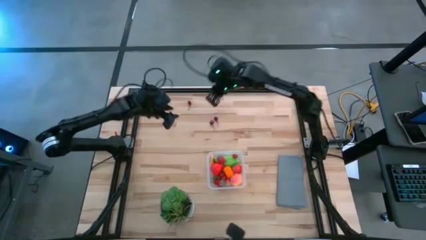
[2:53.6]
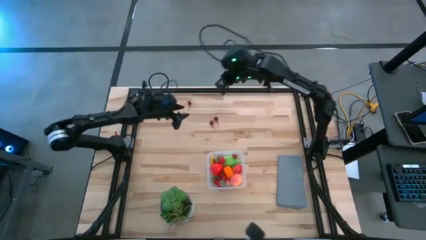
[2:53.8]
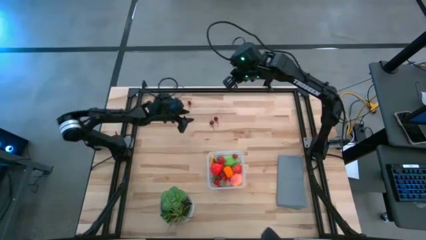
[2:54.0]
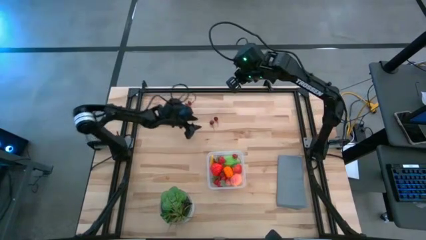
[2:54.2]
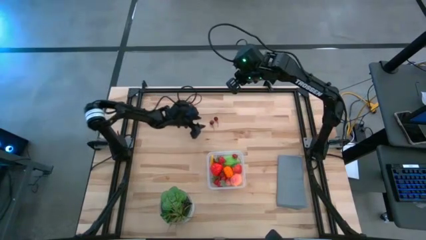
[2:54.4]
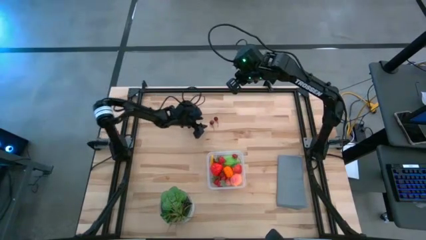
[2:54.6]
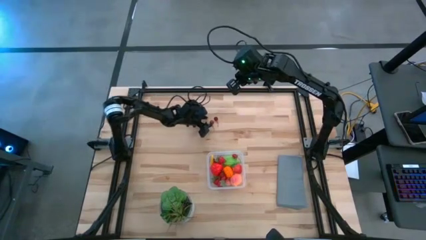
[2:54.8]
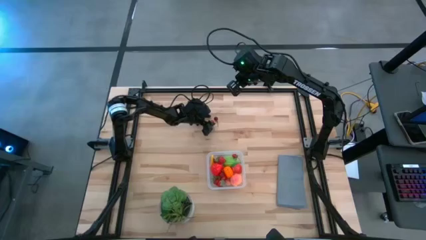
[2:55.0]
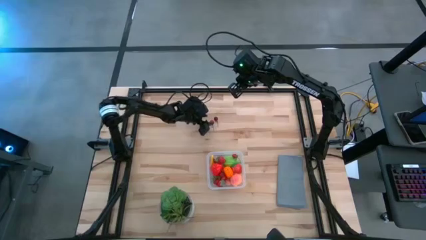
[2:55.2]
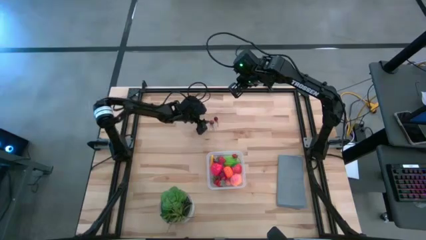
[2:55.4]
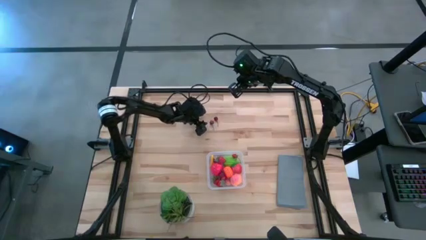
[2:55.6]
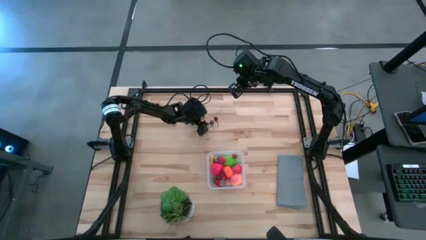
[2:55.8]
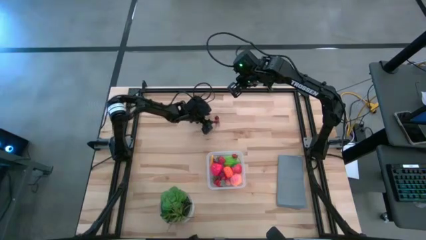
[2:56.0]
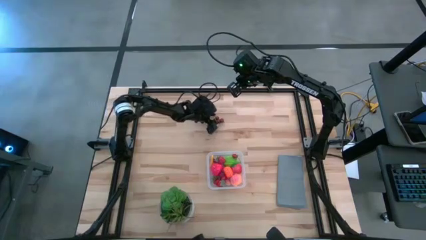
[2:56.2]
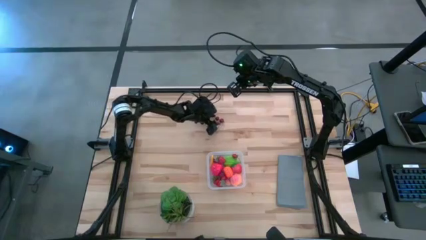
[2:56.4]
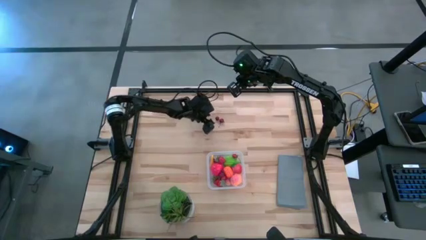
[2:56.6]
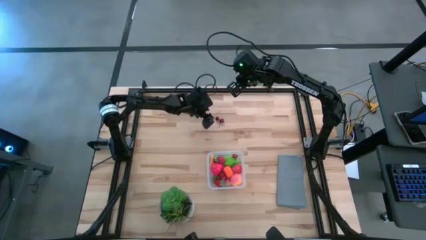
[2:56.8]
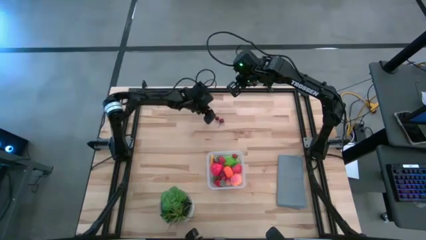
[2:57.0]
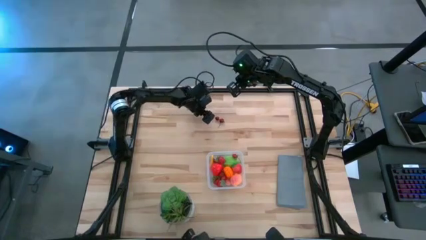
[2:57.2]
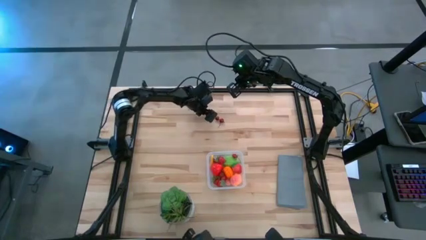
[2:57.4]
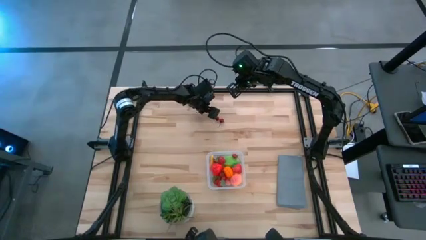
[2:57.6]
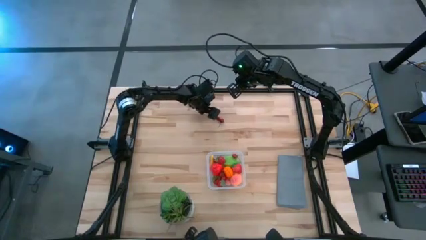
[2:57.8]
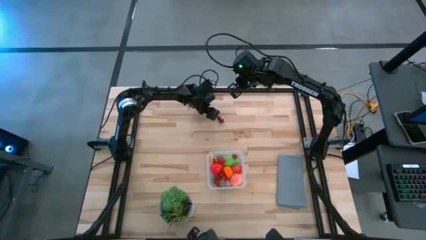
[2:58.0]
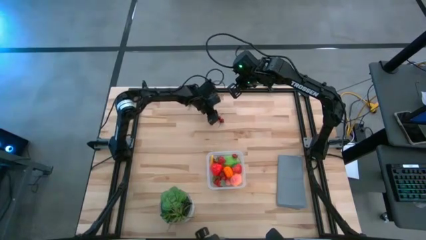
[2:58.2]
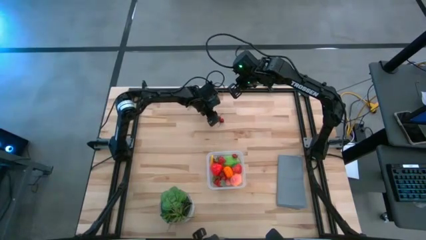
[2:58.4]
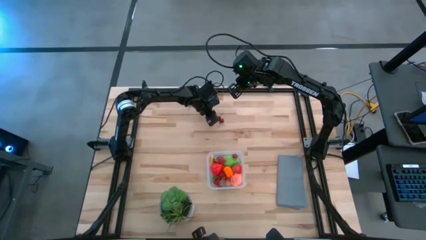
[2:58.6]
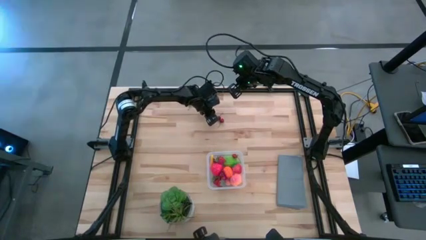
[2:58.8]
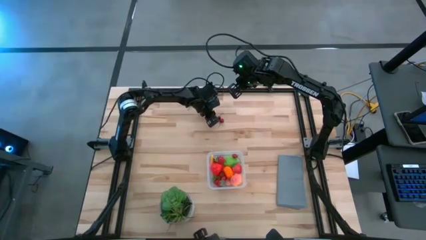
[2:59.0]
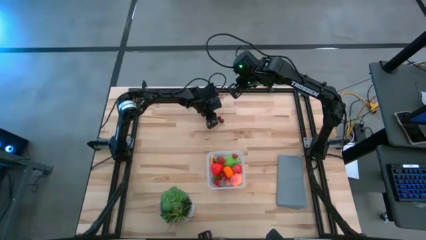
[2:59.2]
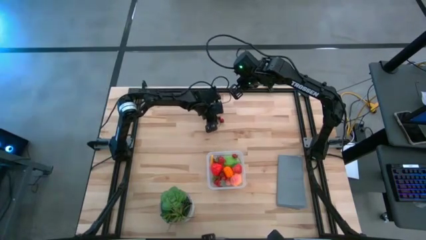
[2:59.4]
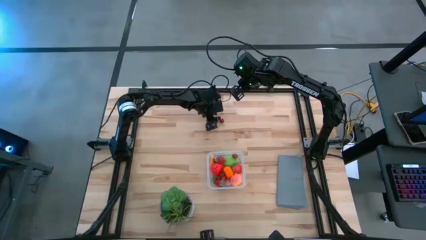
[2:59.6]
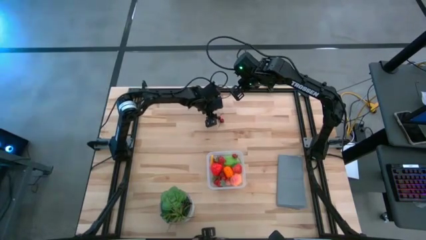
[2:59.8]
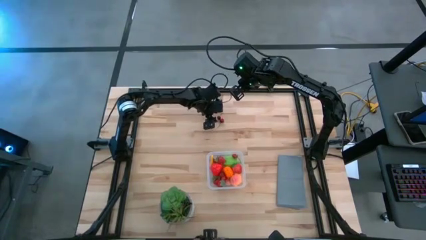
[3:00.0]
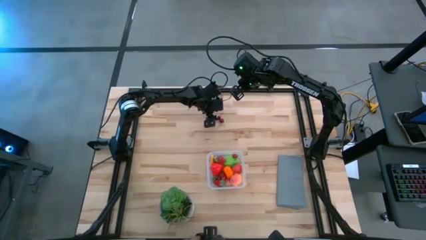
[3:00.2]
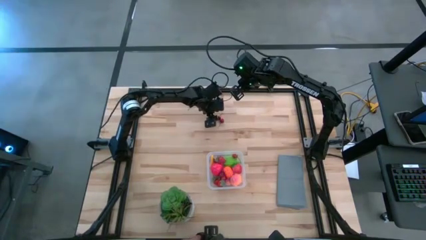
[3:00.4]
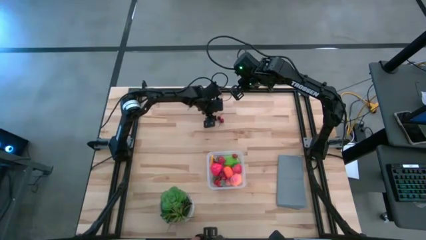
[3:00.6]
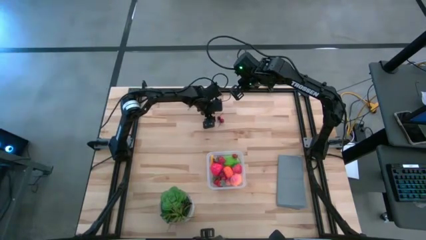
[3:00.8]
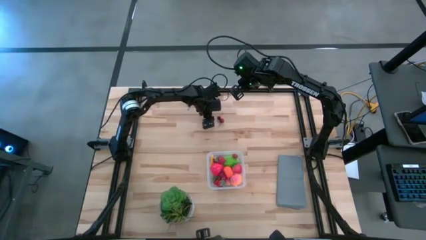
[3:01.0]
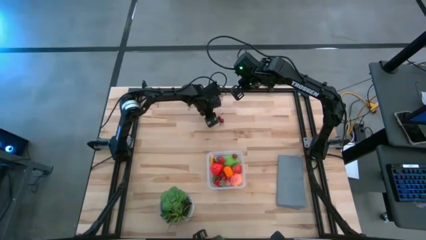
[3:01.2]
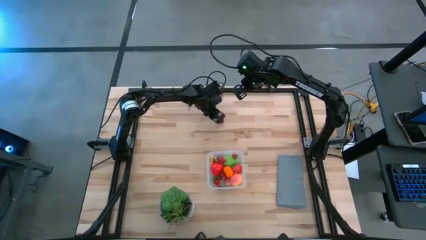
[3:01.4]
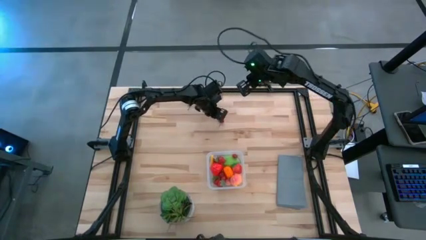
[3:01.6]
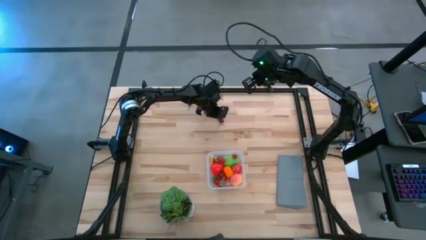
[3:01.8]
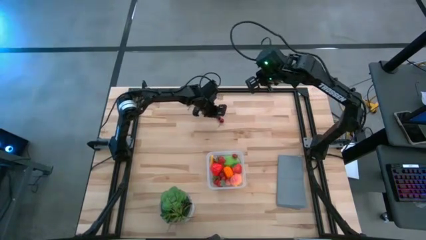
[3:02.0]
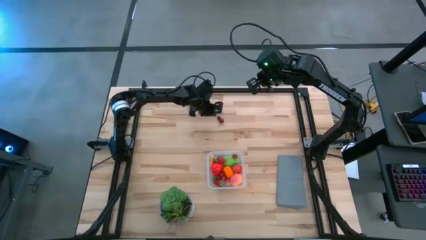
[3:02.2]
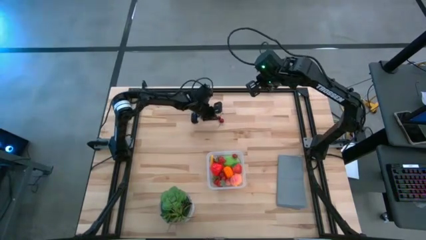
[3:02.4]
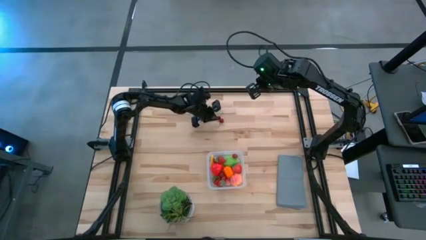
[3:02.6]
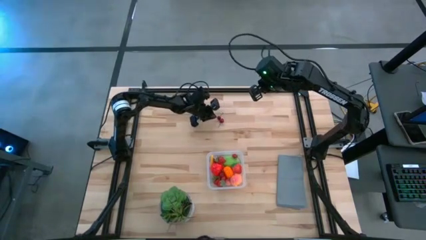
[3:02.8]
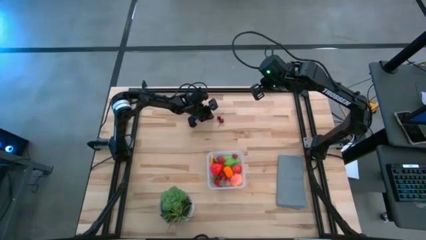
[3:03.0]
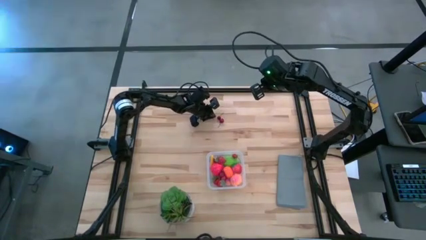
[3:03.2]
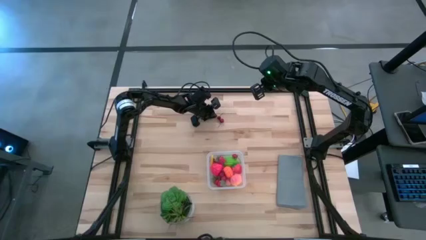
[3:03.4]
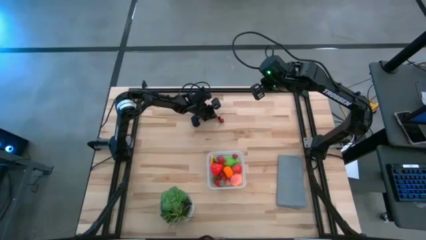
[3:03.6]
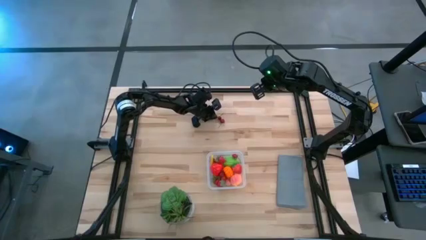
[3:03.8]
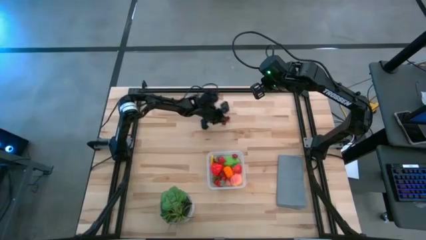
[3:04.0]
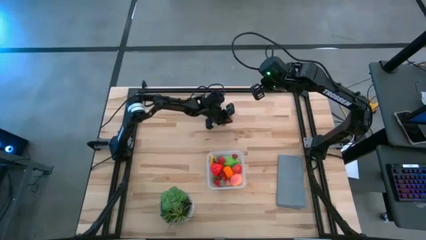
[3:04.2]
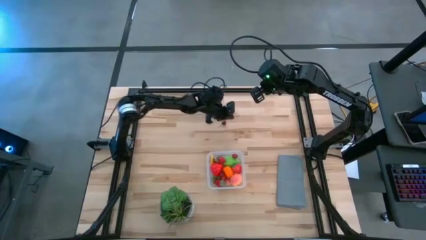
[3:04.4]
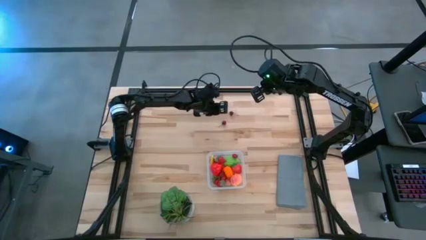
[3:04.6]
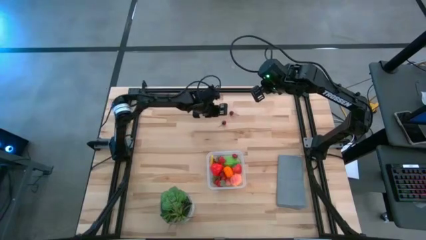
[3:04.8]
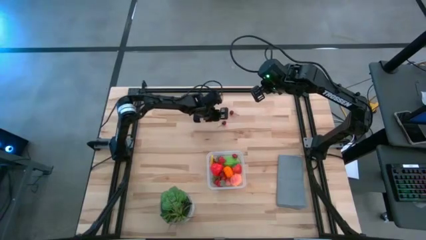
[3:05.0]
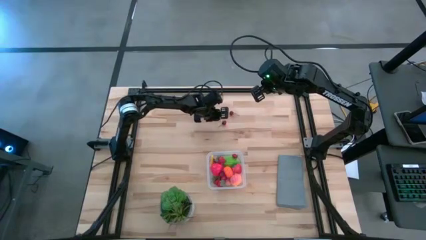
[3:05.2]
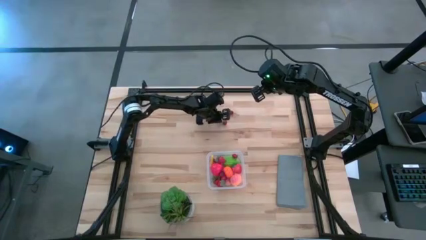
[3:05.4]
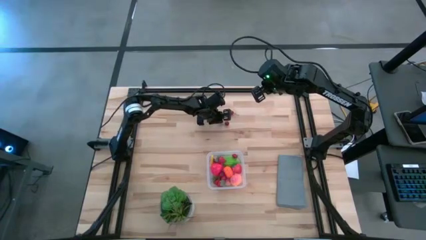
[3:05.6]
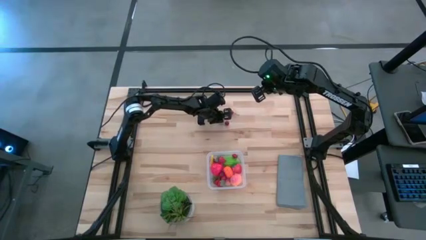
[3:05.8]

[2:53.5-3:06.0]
Task: Pick and placing Produce into tupperware
Put the red cherry into the transparent bin

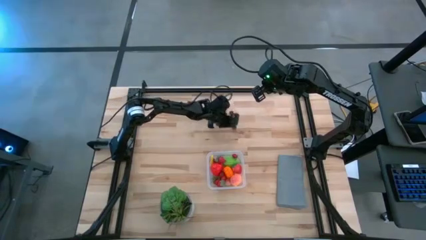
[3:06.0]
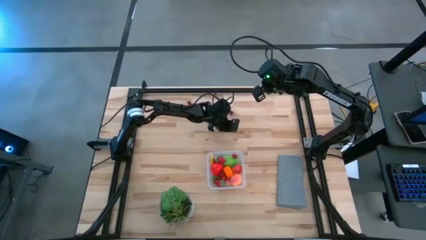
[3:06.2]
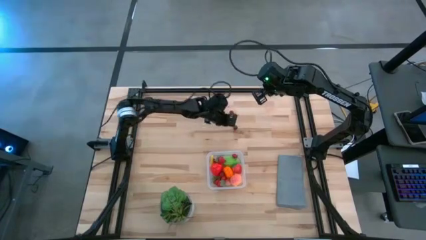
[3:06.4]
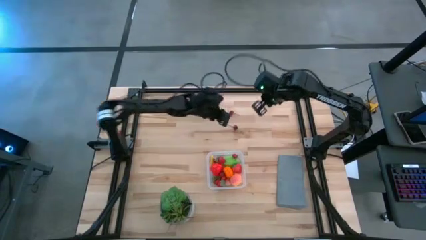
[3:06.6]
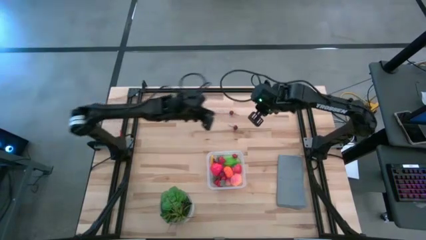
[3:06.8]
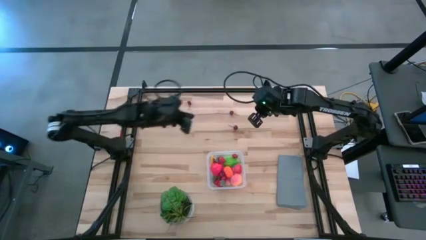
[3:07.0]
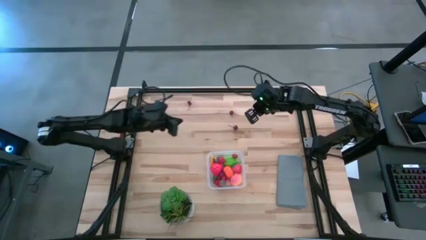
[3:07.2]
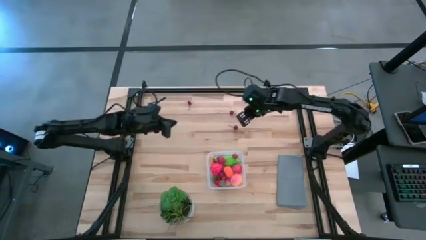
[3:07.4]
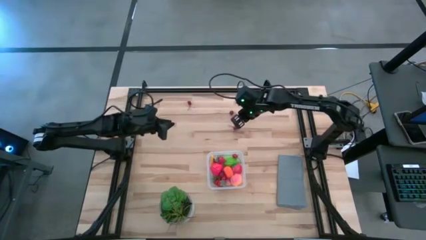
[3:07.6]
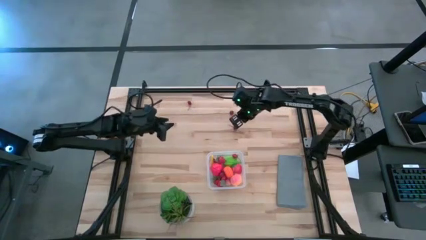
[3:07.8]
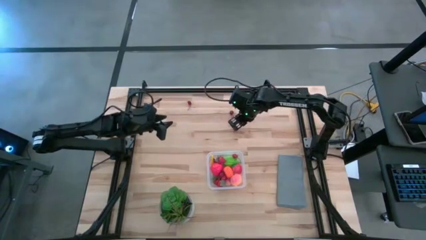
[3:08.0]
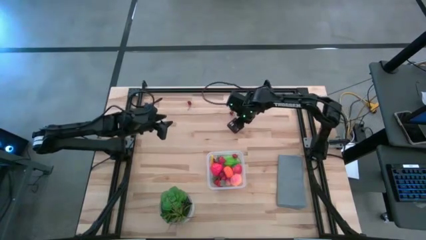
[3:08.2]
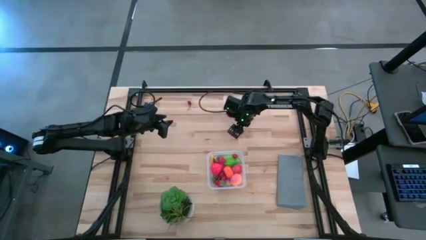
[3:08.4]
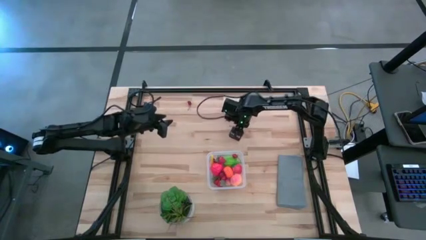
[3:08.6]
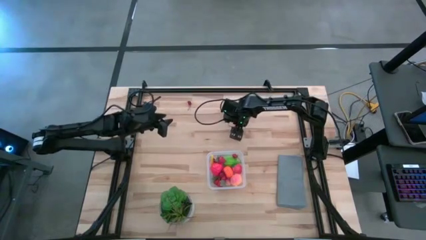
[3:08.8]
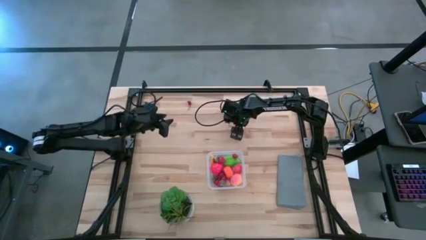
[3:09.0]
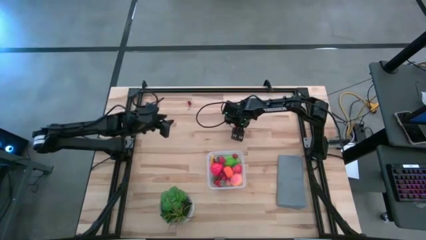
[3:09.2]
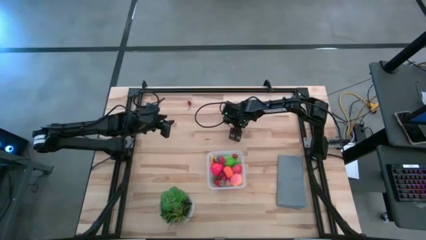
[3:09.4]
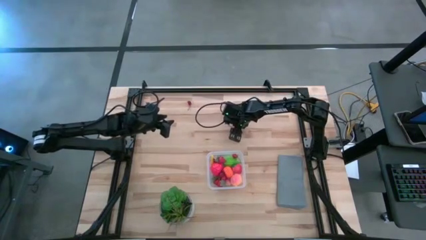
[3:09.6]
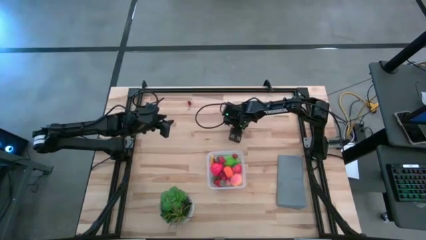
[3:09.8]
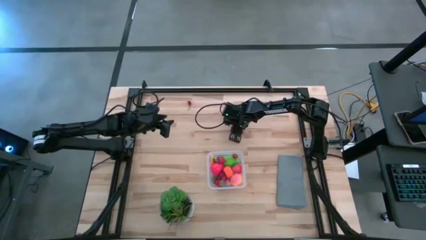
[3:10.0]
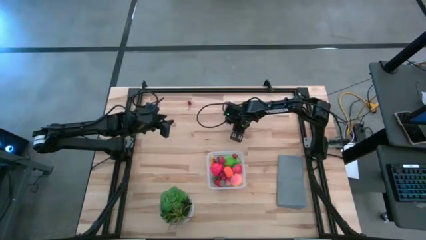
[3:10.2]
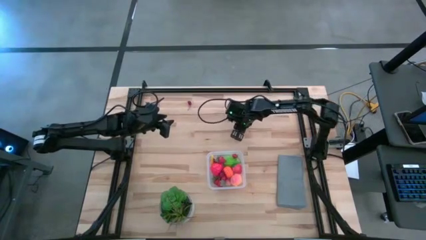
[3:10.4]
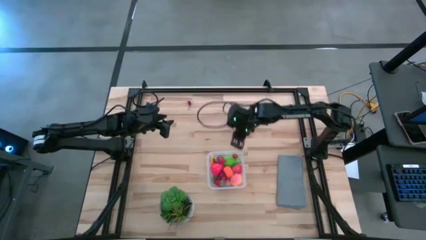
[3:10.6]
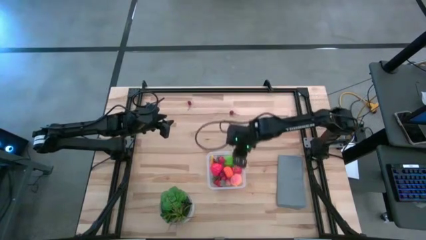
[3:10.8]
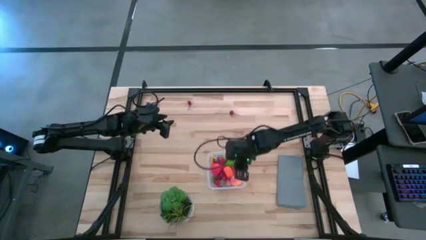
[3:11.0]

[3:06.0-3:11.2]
Put the red cherry into the transparent bin
